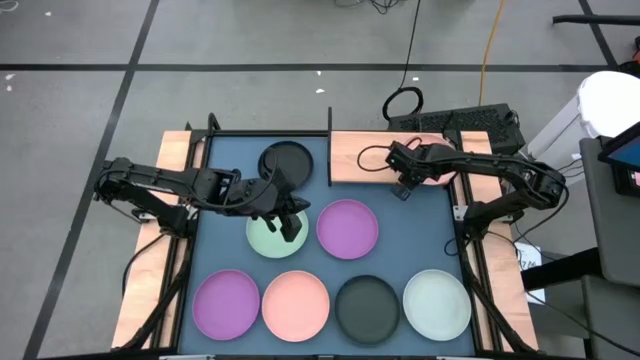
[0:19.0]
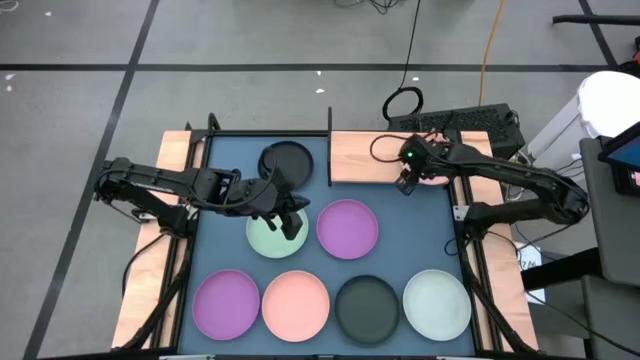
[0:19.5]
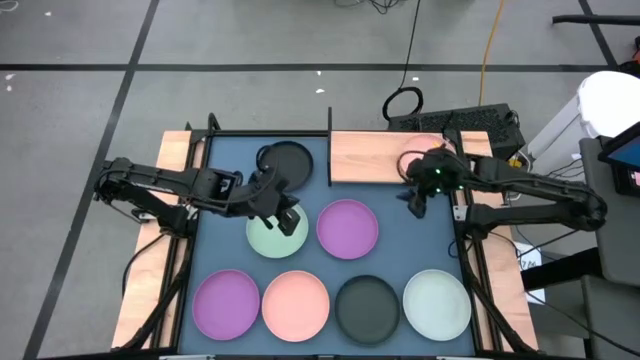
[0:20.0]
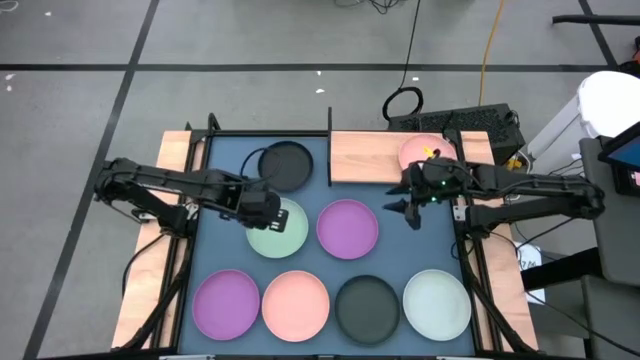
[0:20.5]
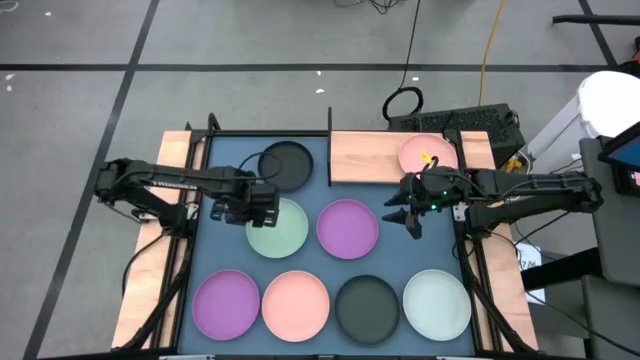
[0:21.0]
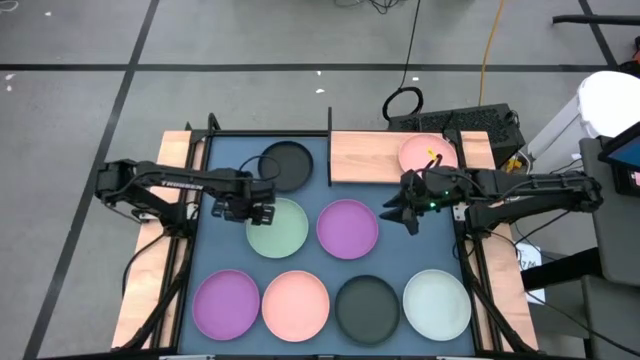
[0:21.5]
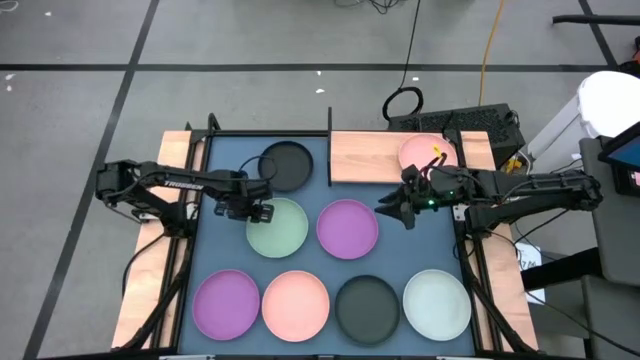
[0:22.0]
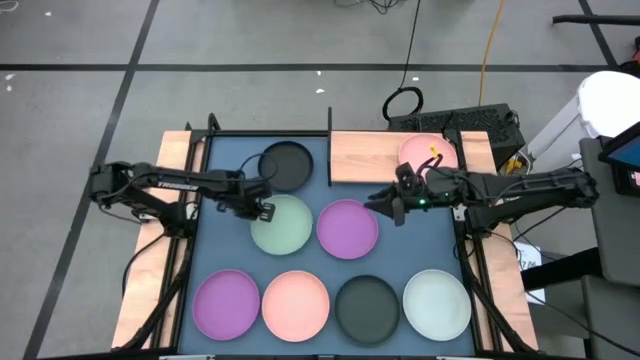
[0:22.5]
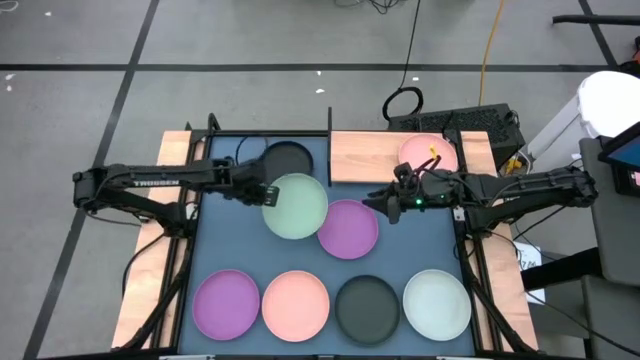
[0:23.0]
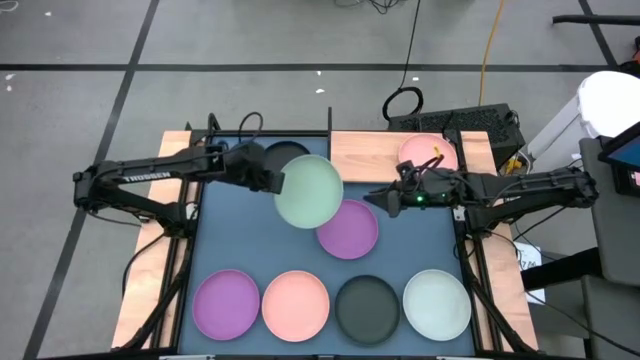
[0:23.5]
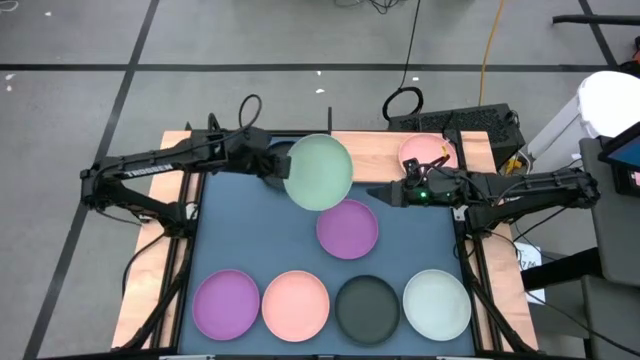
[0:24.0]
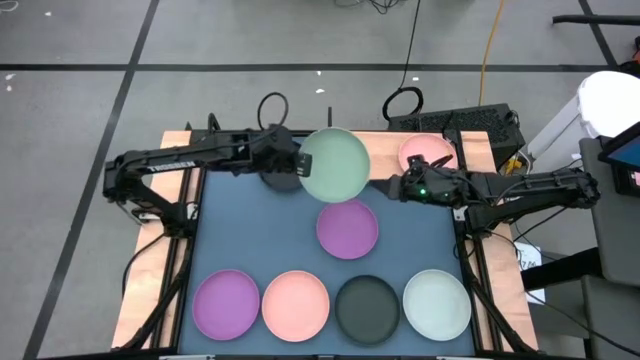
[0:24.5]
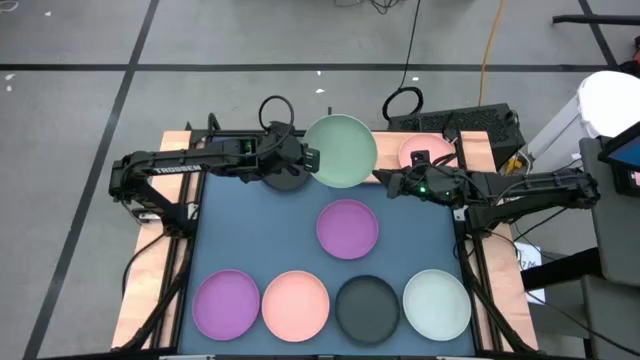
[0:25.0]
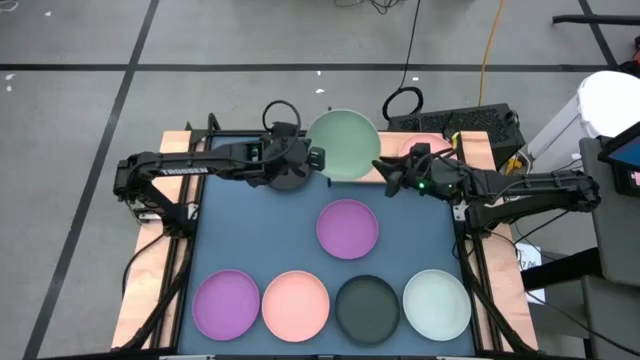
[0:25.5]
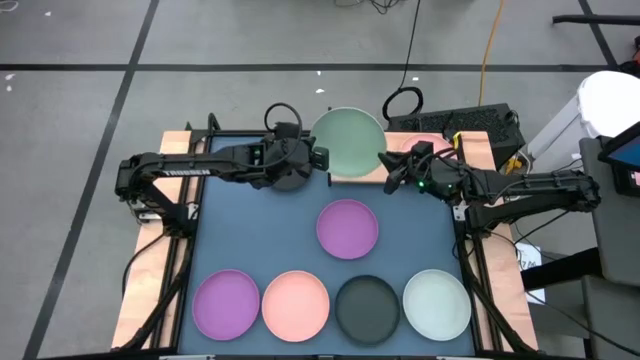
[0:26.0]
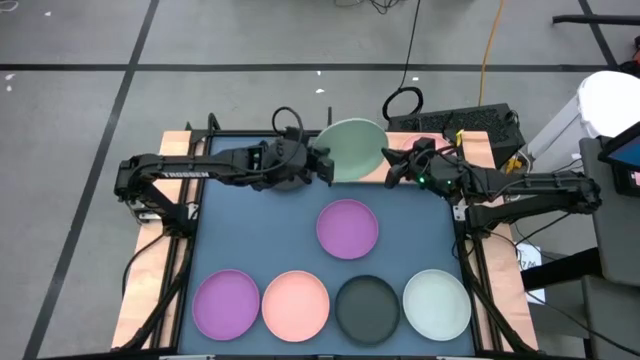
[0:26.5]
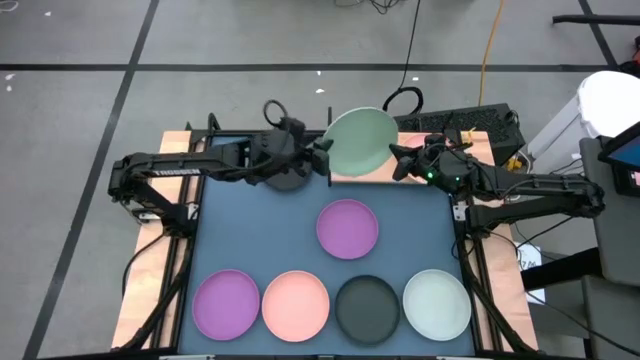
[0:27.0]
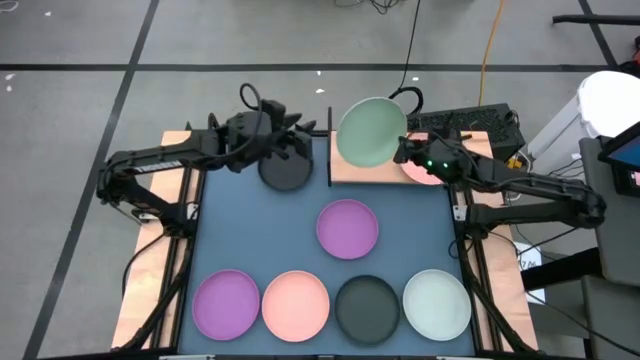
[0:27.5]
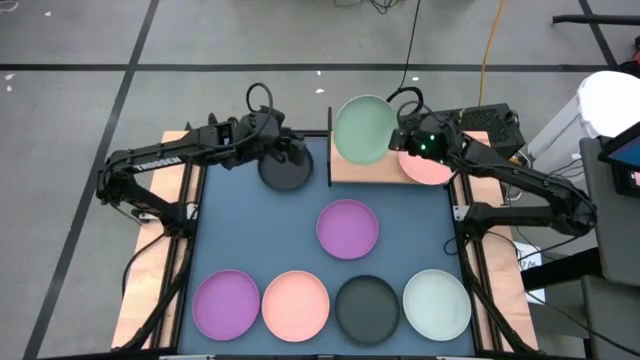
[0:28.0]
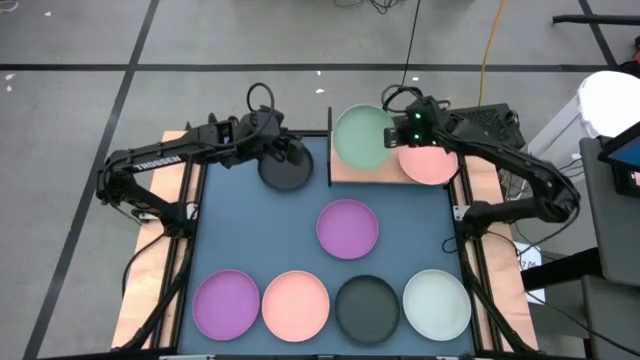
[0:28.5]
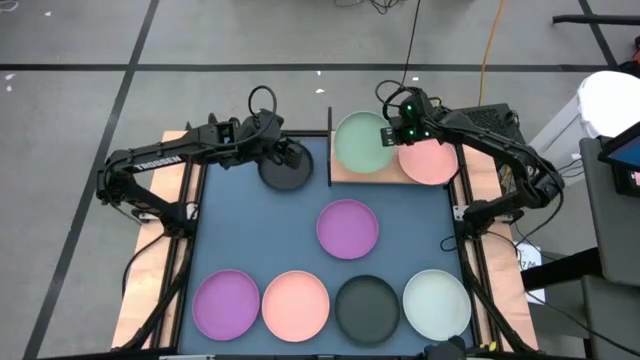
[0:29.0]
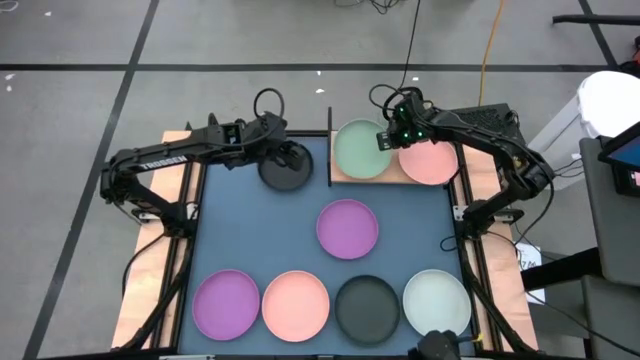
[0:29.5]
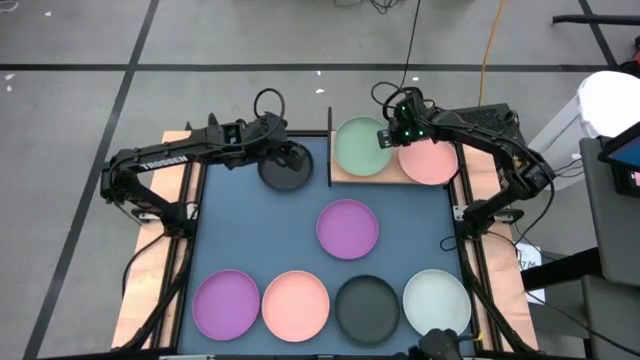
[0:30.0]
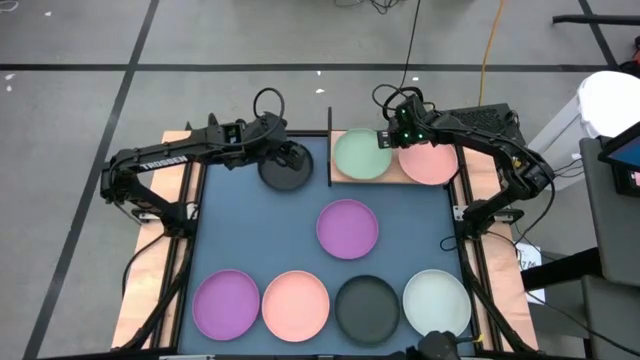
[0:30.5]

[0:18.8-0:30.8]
Task: Place and stack plates onto a shelf
Put the green plate on the shelf

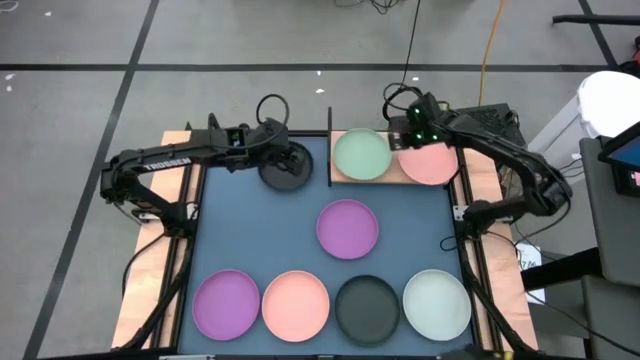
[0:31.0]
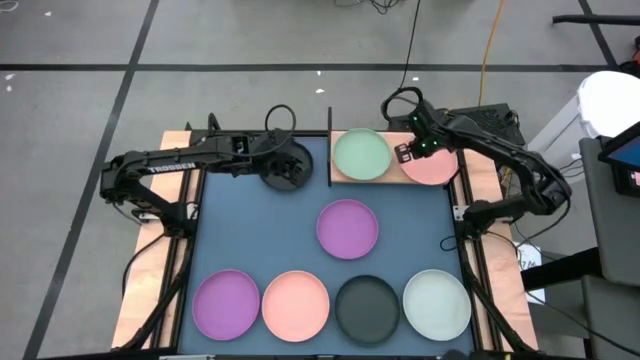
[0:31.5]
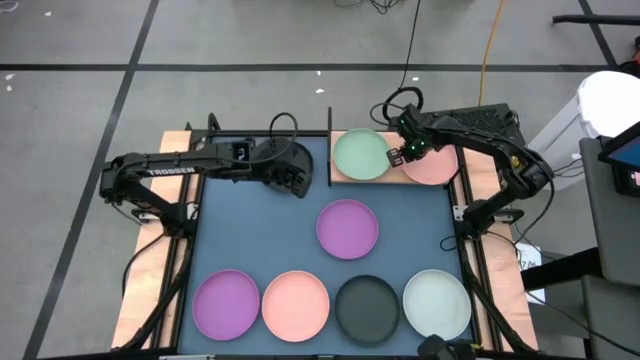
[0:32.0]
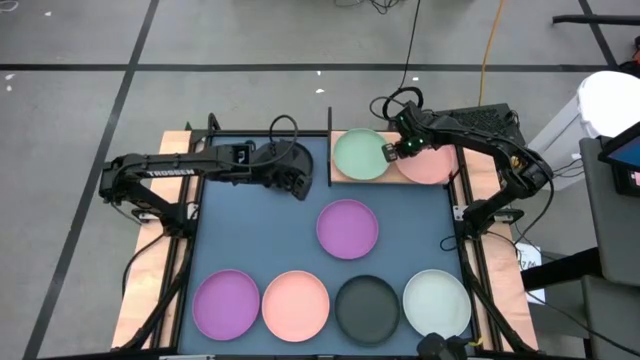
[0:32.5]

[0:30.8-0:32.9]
Adjust the orange plate on the shelf

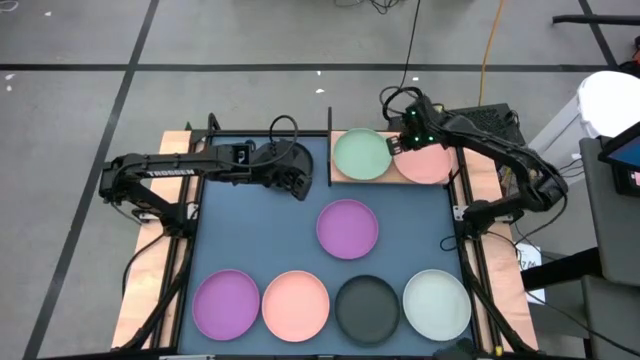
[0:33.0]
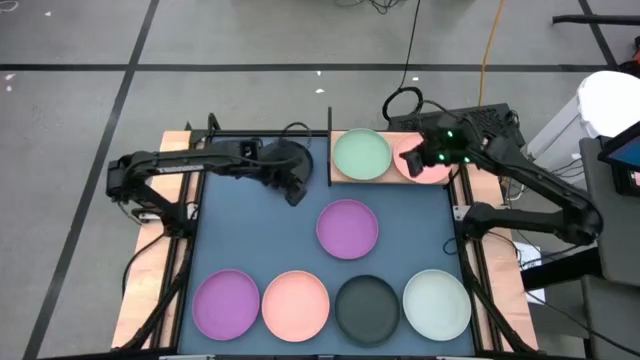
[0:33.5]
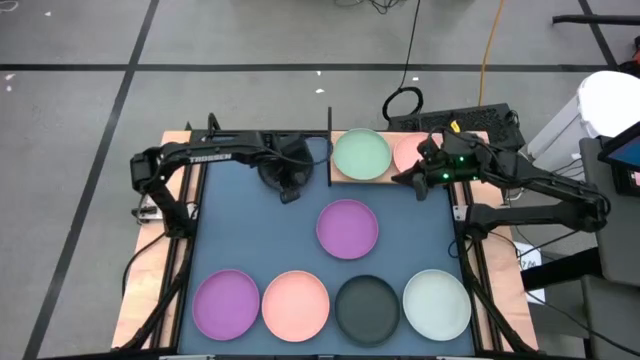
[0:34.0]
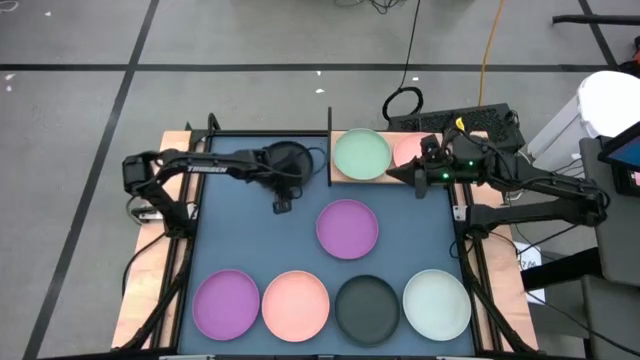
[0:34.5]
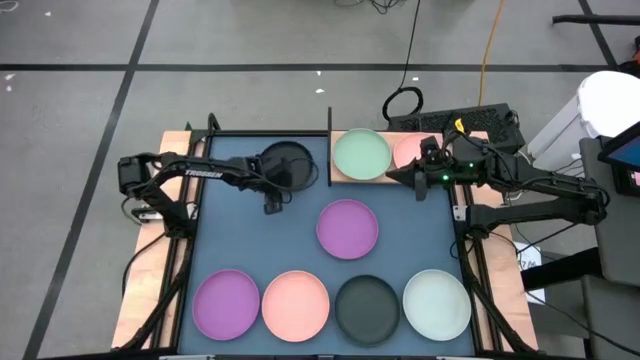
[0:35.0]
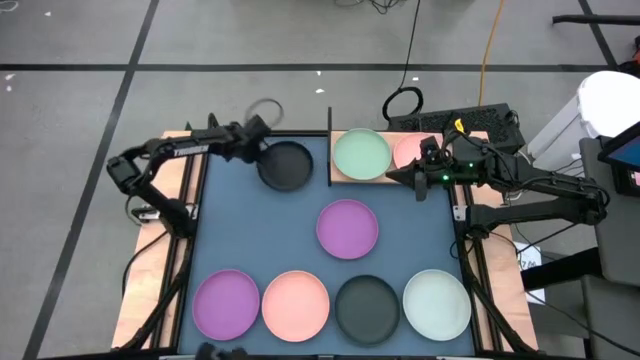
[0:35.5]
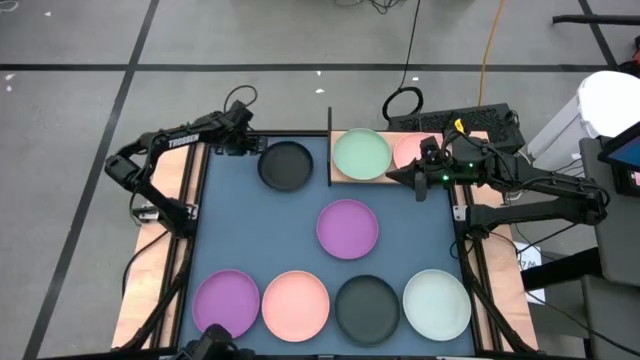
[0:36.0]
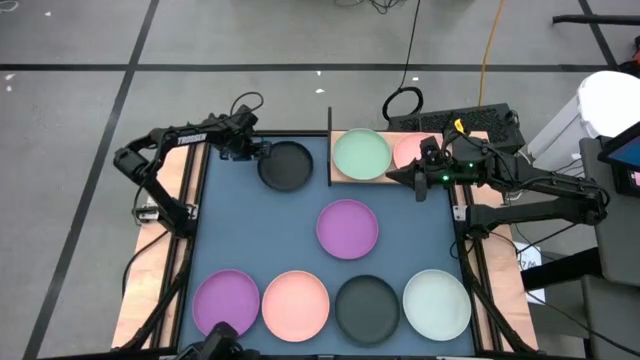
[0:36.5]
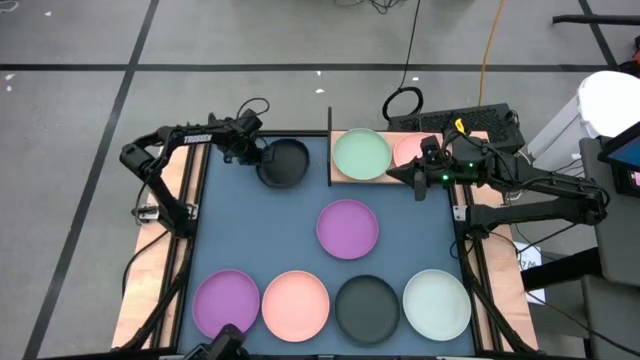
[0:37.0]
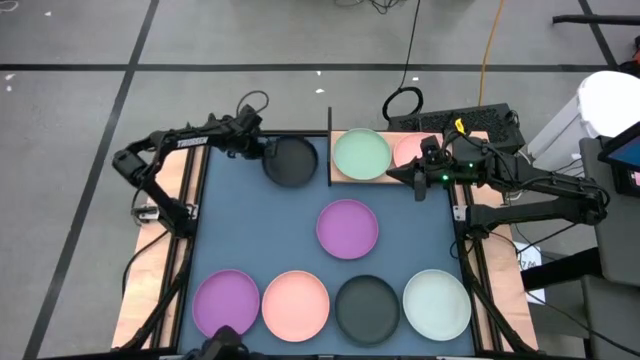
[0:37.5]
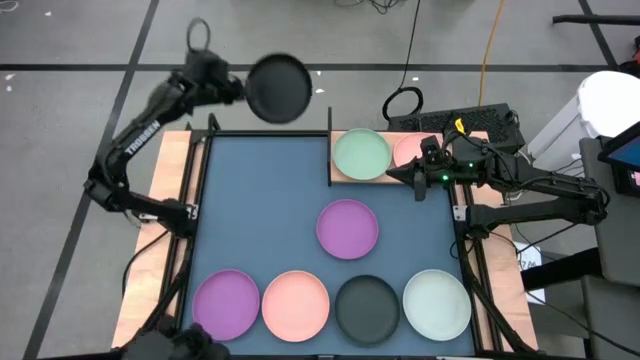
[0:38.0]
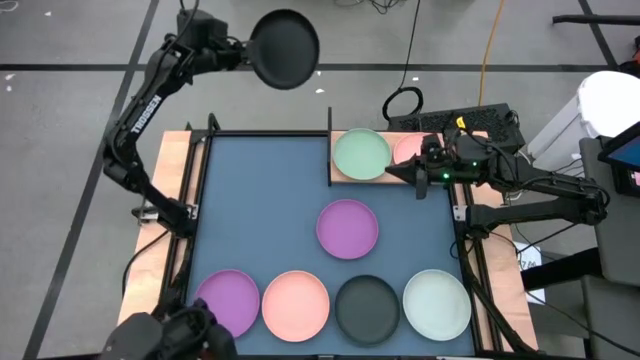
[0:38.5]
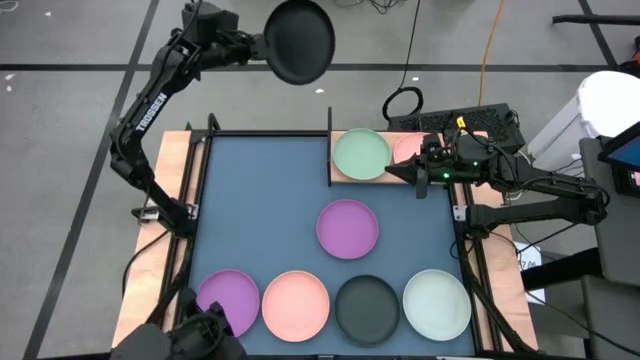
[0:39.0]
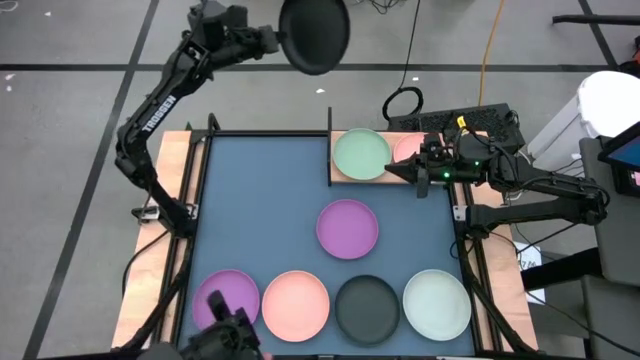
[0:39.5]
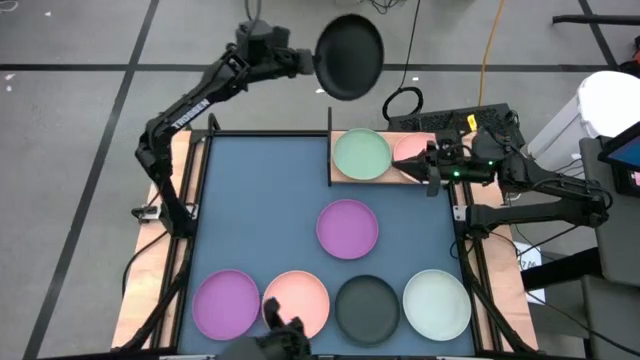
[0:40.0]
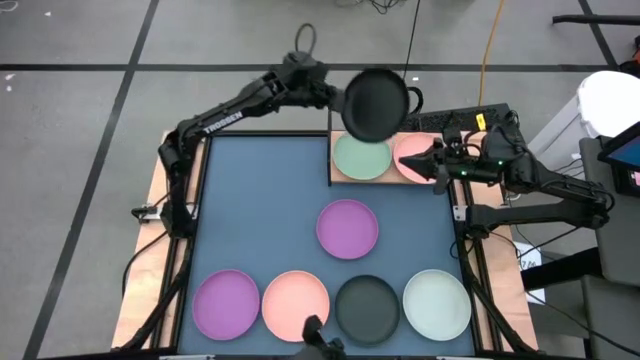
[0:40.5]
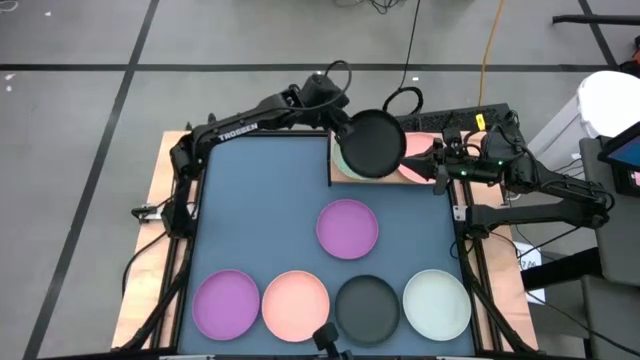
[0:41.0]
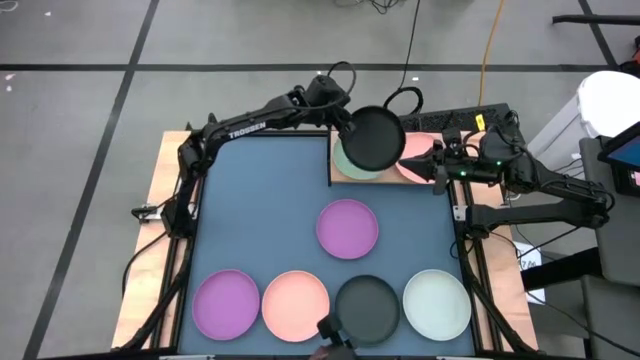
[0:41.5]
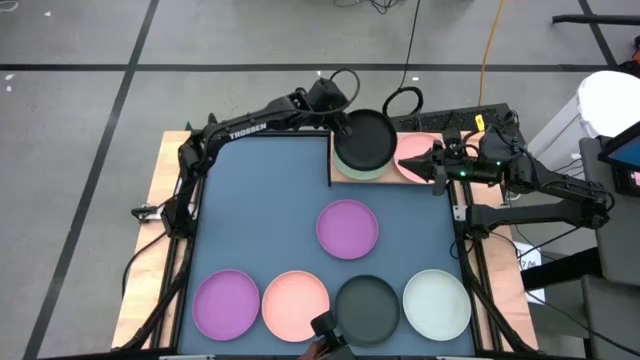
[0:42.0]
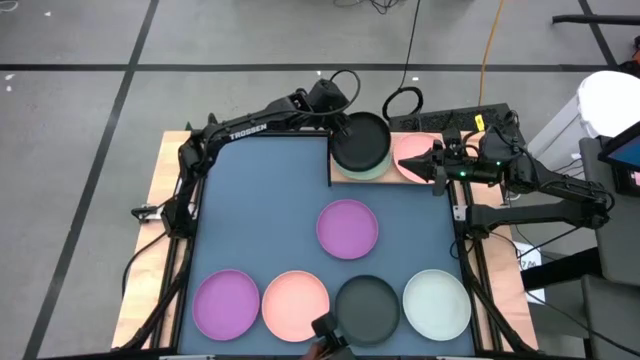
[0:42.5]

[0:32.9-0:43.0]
Stack the top black plate on top of the green plate on the shelf
